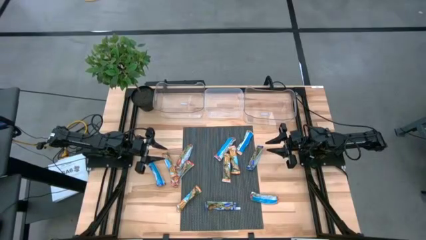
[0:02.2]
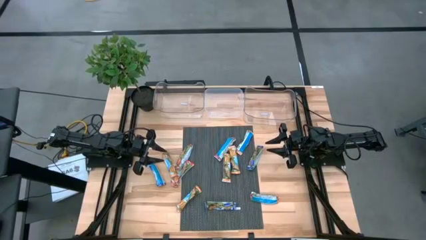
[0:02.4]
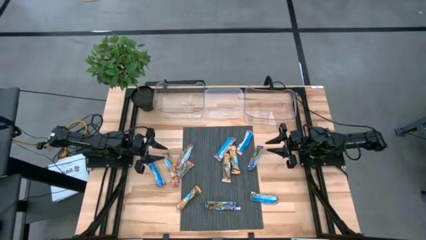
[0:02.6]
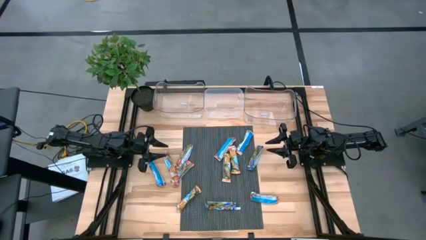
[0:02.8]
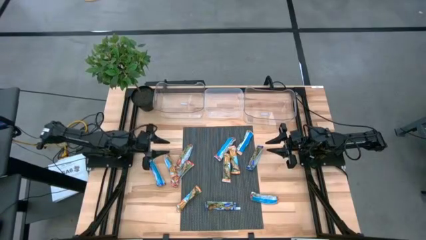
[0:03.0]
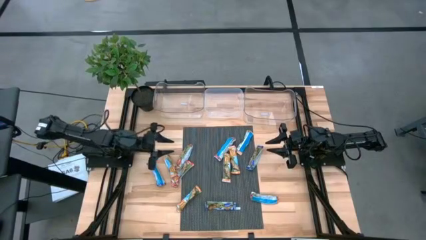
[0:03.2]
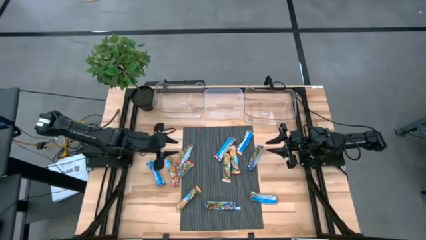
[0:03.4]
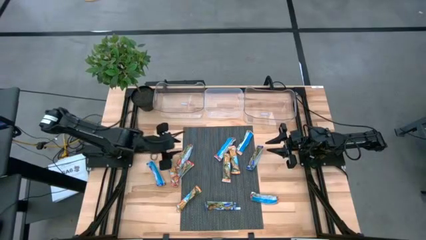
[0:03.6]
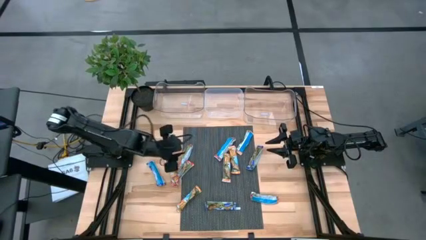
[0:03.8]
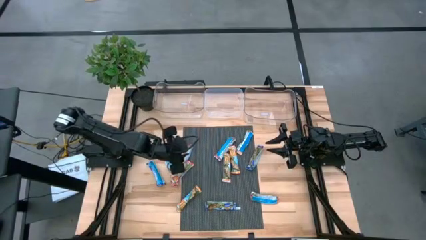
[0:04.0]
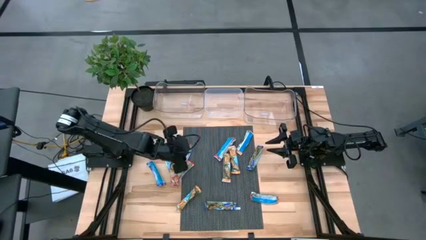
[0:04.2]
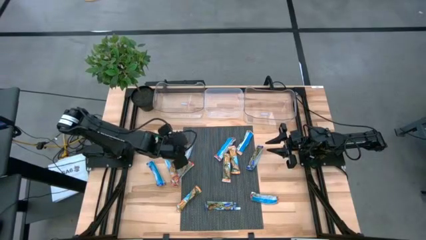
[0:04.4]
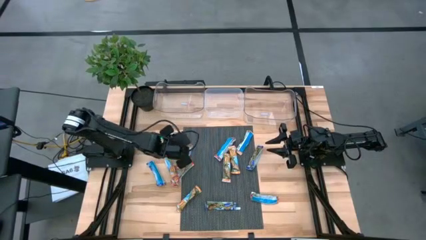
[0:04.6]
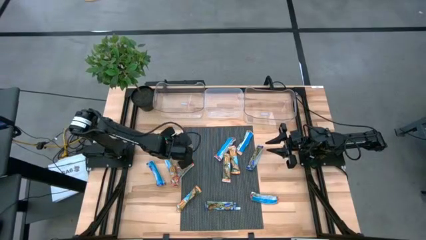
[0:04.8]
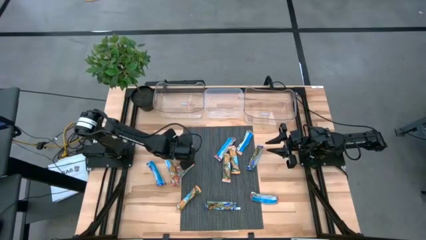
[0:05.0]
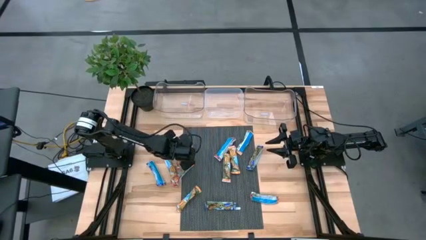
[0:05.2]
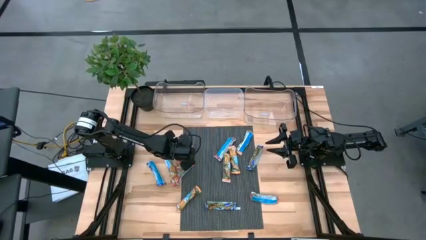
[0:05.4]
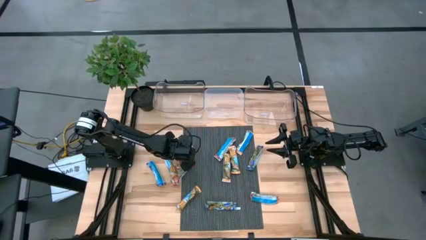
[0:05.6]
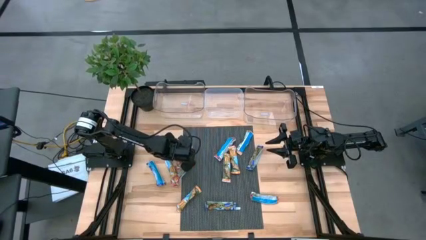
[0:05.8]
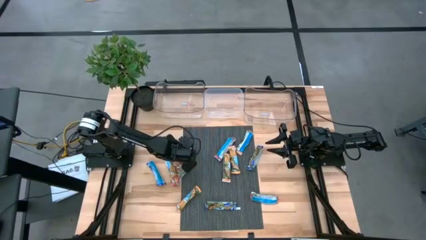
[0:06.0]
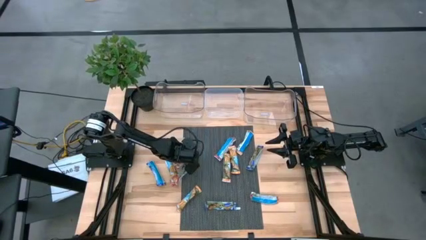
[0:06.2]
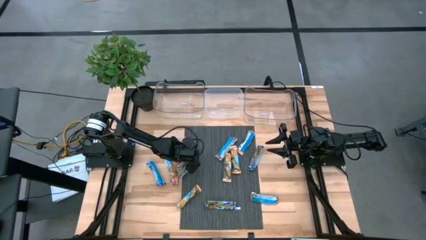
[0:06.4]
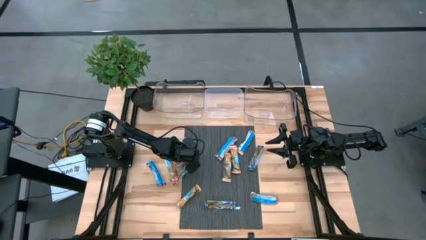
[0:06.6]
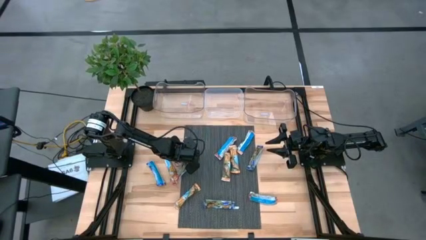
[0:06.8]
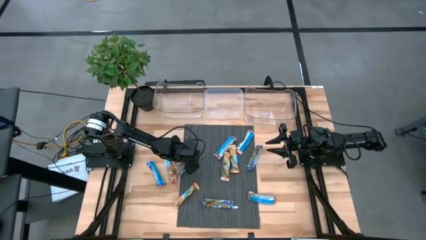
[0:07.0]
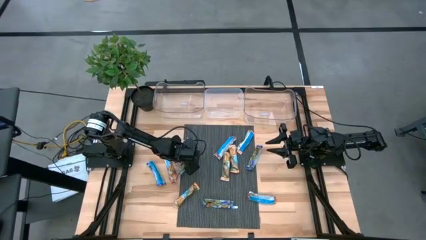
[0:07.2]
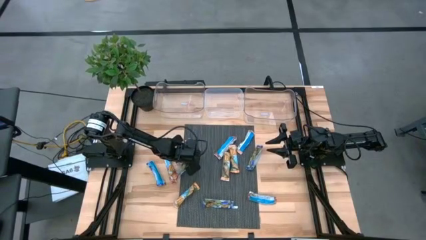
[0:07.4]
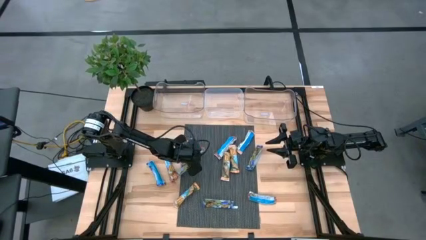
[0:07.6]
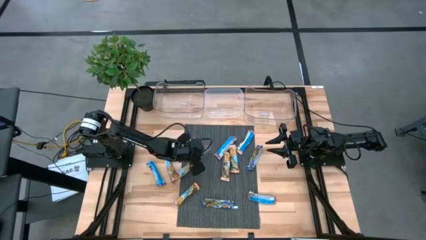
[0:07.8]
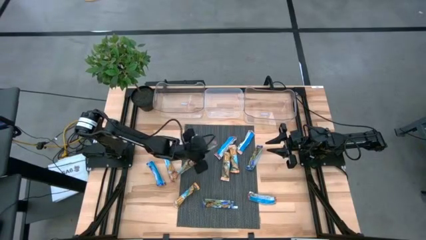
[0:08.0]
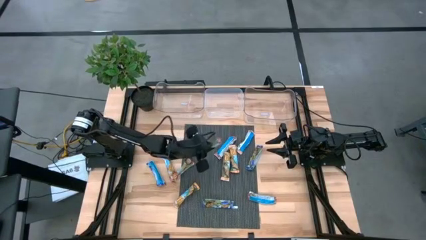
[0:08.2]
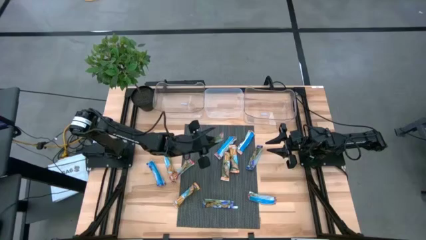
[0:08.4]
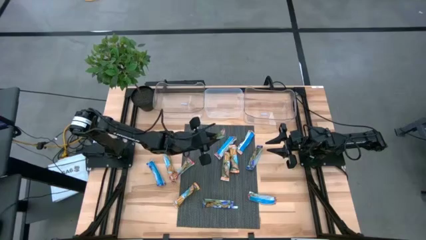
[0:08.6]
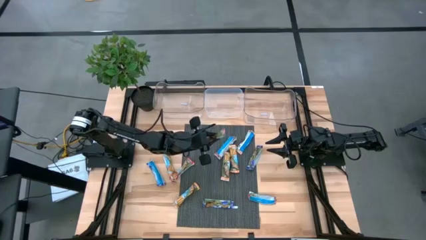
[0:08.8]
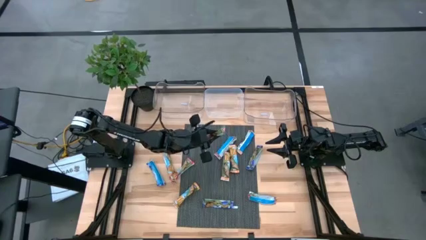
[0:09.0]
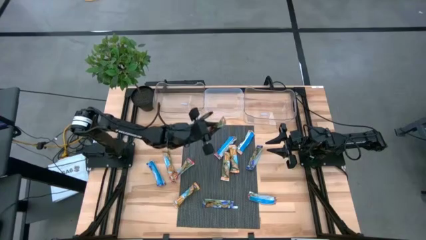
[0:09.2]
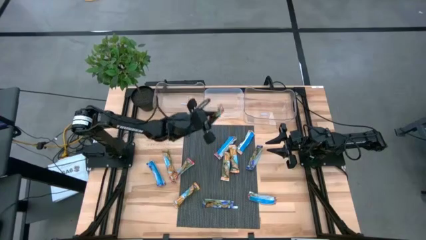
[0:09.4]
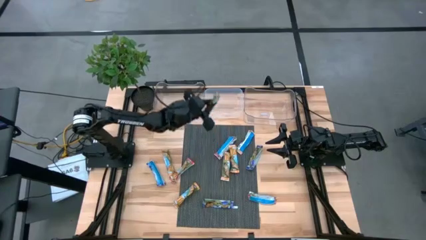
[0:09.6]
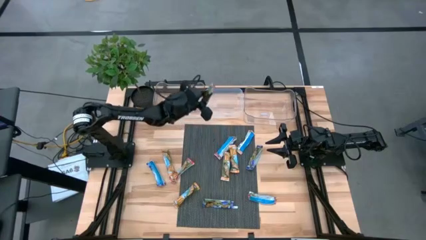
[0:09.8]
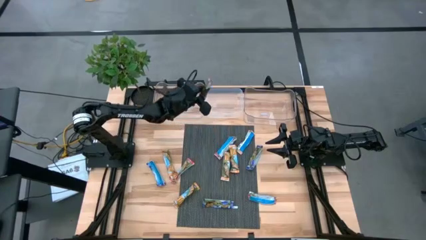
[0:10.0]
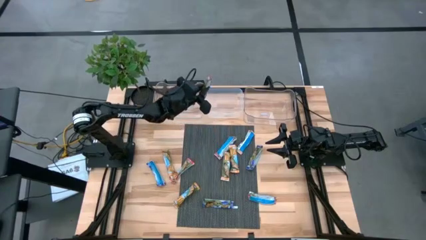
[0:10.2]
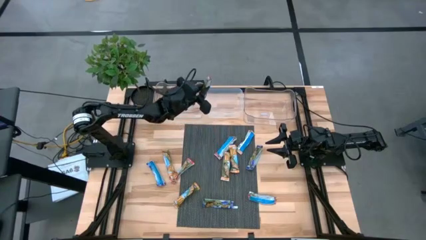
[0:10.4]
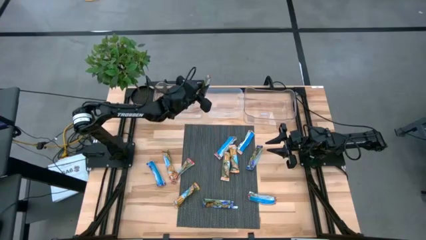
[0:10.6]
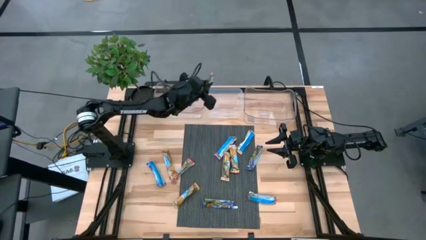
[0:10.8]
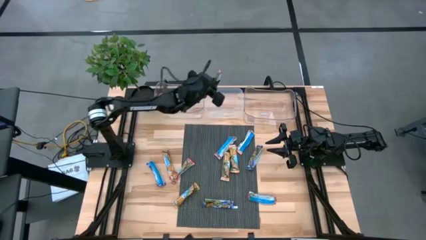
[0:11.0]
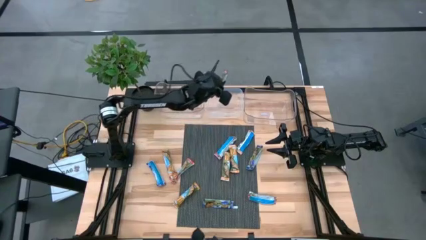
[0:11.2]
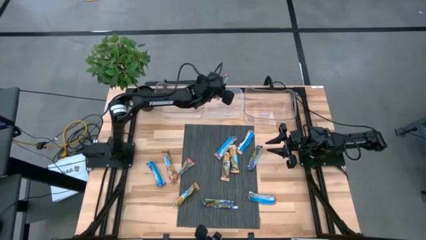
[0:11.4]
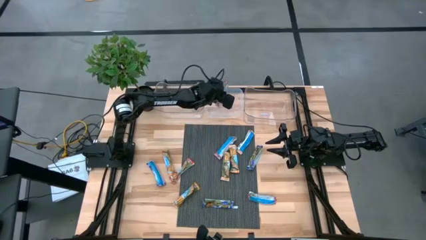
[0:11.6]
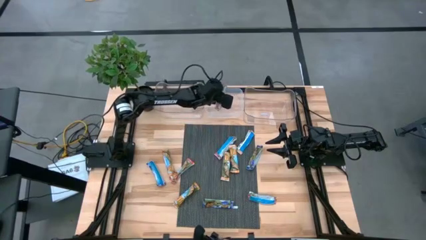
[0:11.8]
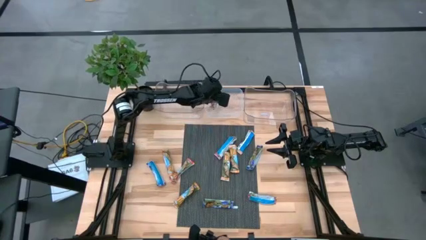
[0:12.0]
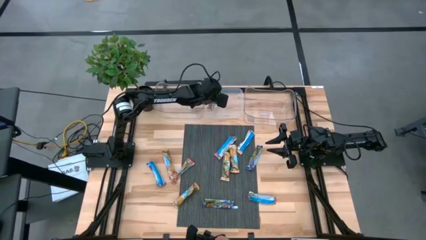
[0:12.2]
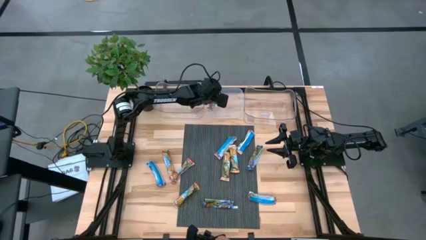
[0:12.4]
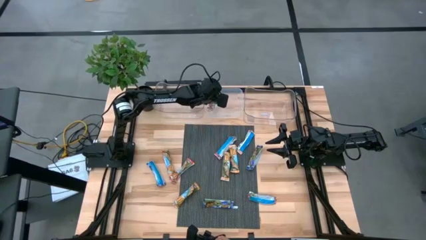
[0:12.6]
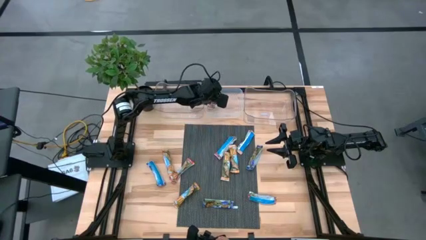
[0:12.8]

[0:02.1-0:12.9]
Task: Pick and place Granola Bars by type
Put the red granola bar into the white bin

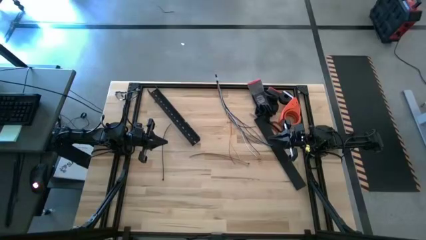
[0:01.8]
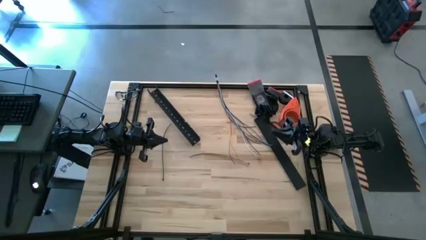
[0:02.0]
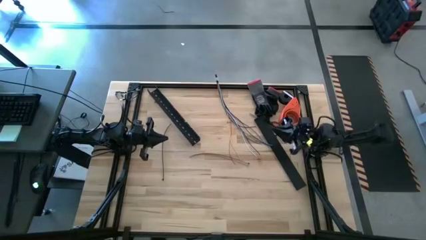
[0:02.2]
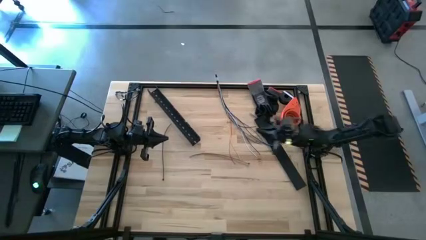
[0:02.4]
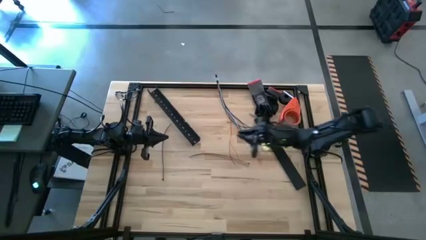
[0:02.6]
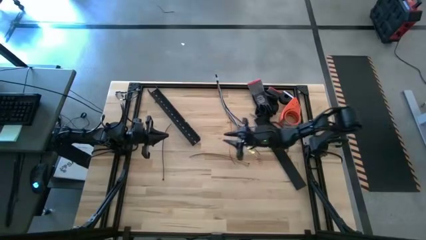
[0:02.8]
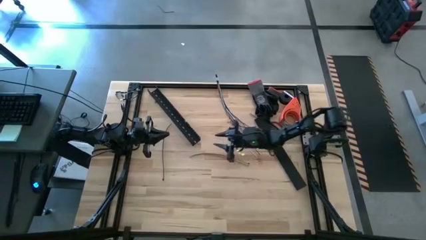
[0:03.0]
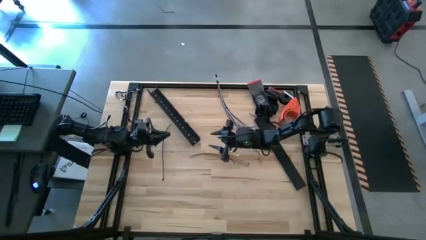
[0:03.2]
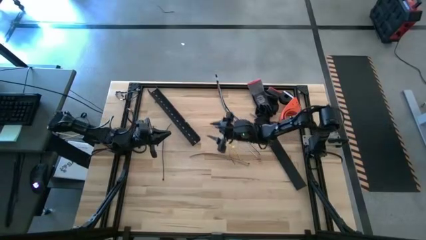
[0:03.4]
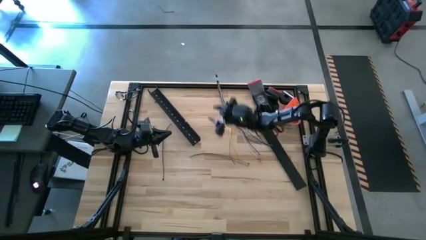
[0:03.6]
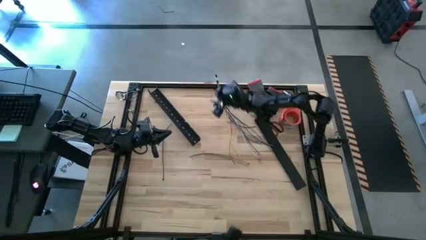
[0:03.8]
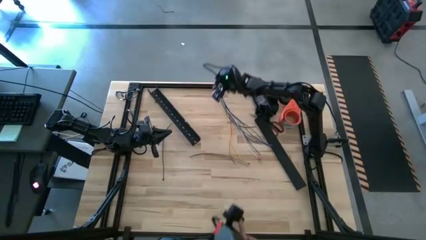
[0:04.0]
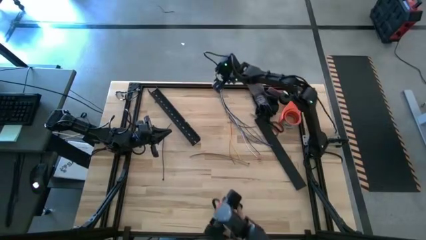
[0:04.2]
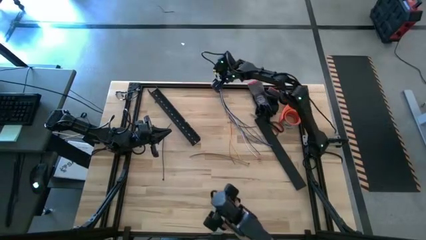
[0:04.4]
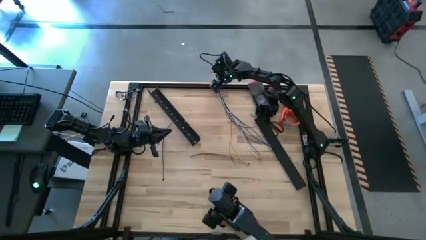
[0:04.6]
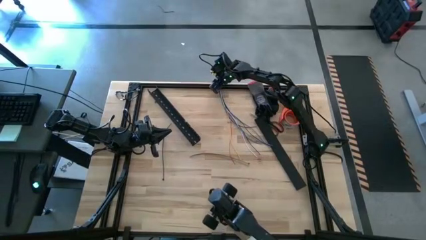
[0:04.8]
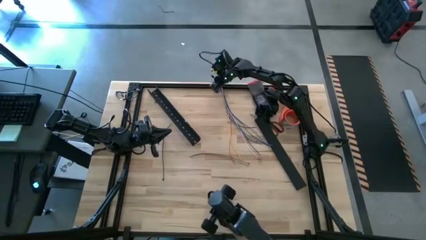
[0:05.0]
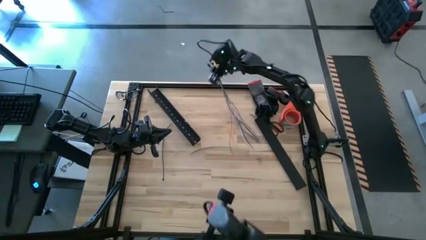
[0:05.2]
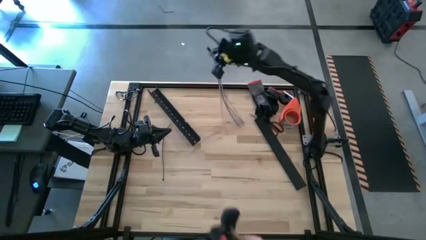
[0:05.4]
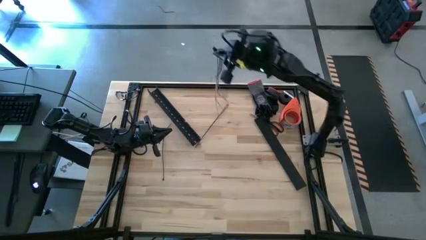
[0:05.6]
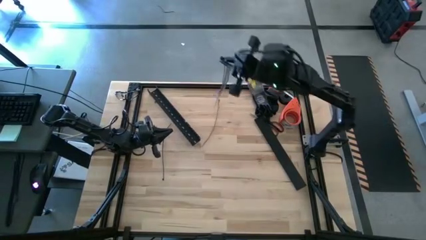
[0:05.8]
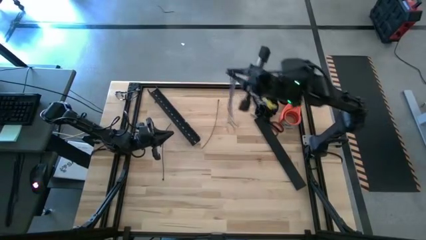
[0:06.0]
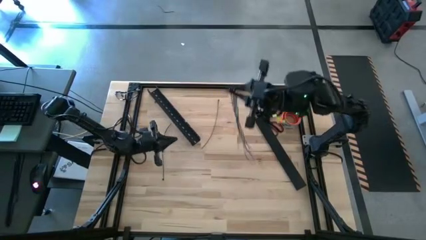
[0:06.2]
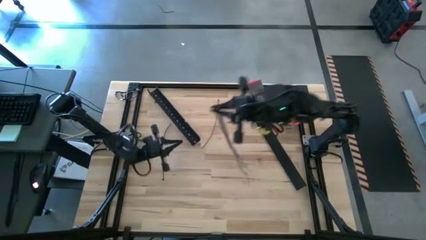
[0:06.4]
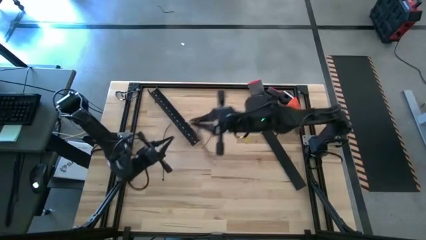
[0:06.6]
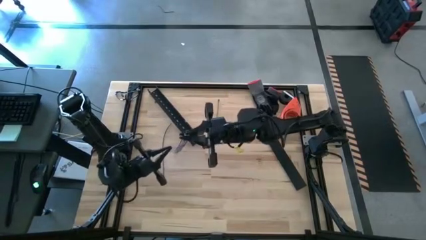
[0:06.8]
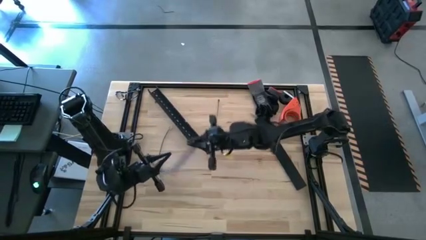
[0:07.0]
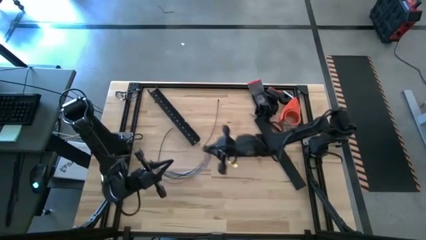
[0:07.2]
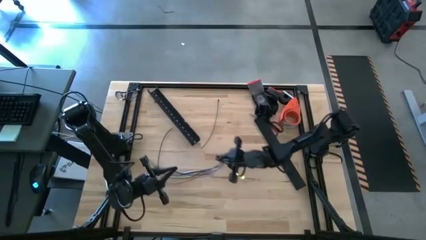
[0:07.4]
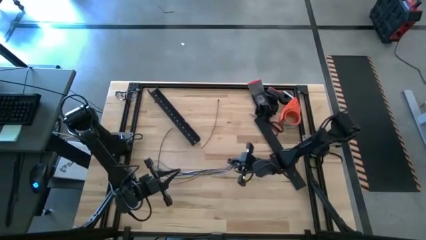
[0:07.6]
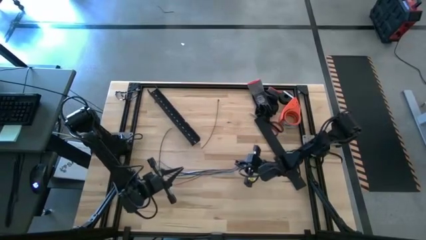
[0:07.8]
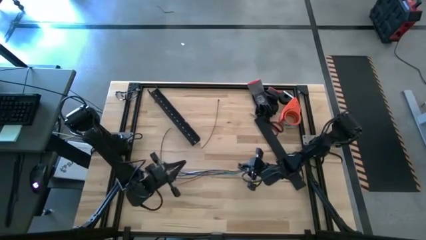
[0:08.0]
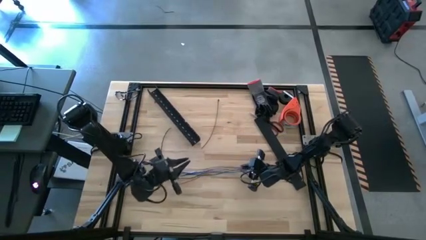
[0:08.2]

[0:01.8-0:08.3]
Task: Ziptie cables
Put the colored cables in the center of the table
